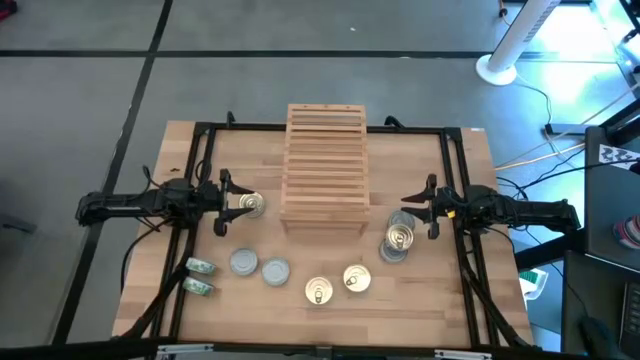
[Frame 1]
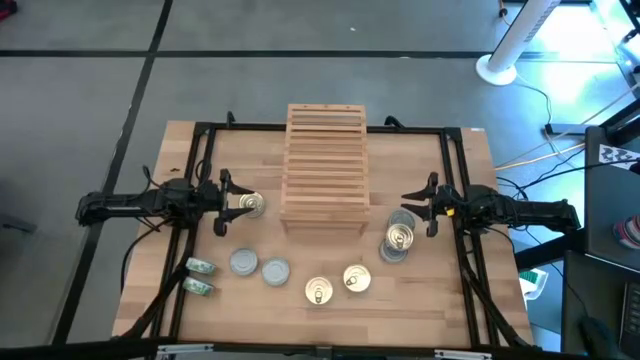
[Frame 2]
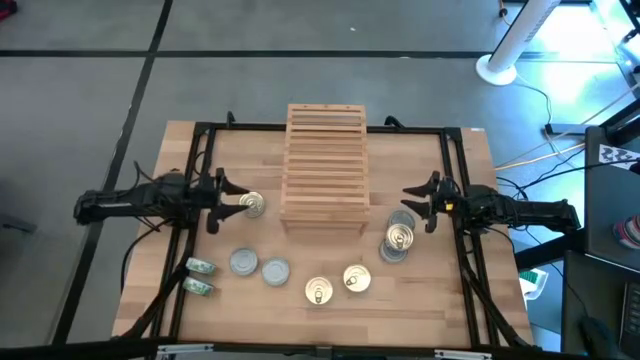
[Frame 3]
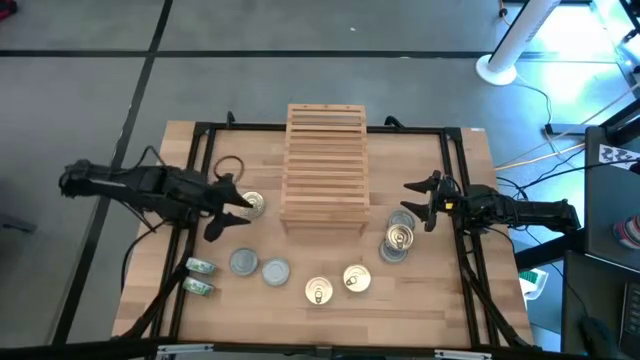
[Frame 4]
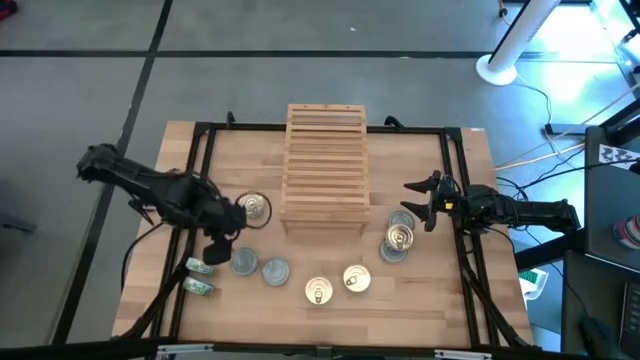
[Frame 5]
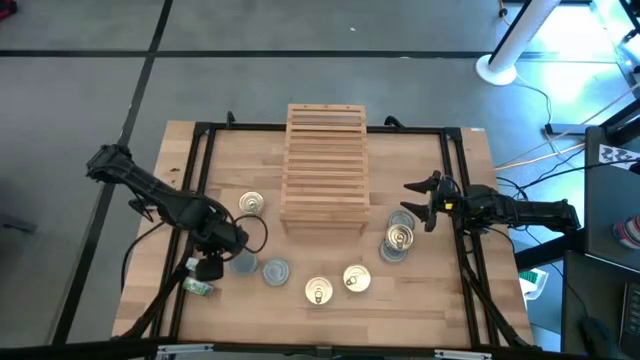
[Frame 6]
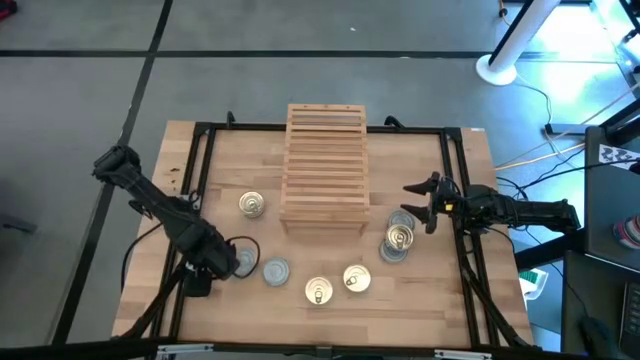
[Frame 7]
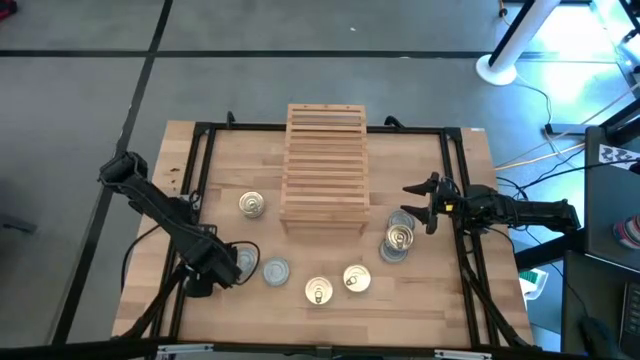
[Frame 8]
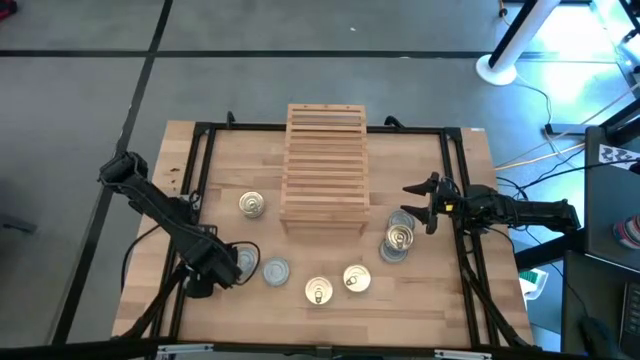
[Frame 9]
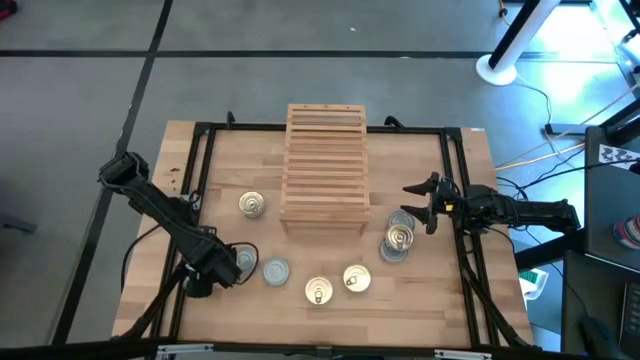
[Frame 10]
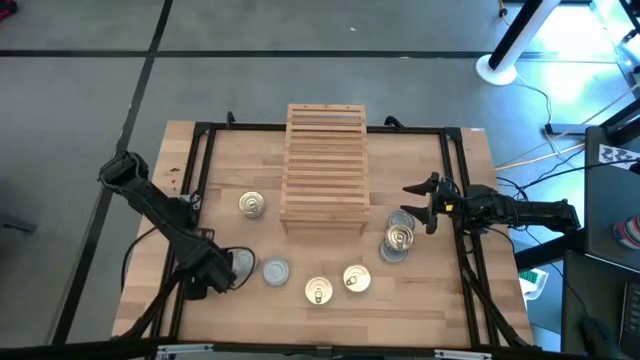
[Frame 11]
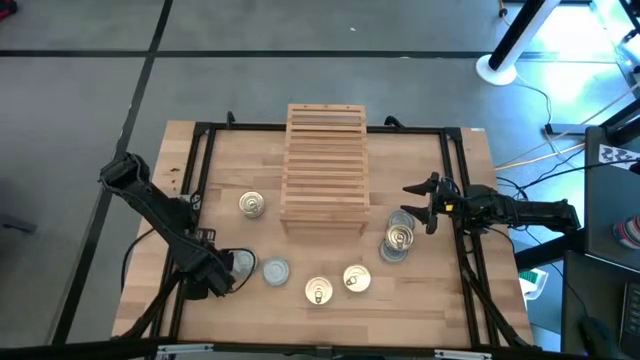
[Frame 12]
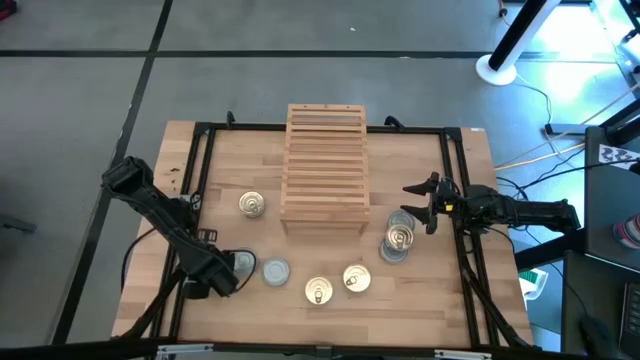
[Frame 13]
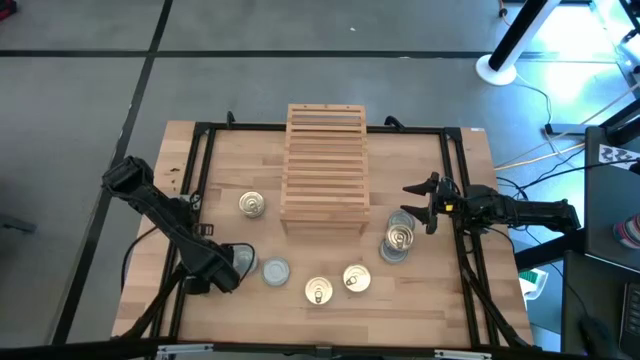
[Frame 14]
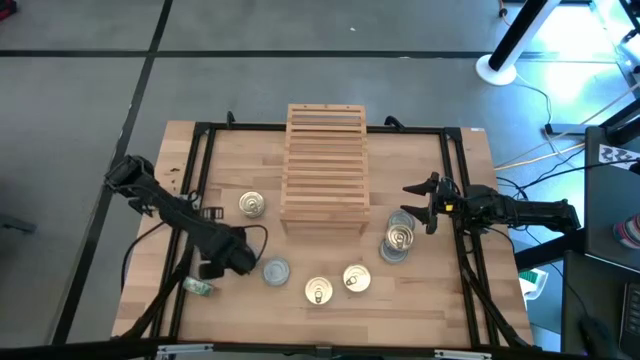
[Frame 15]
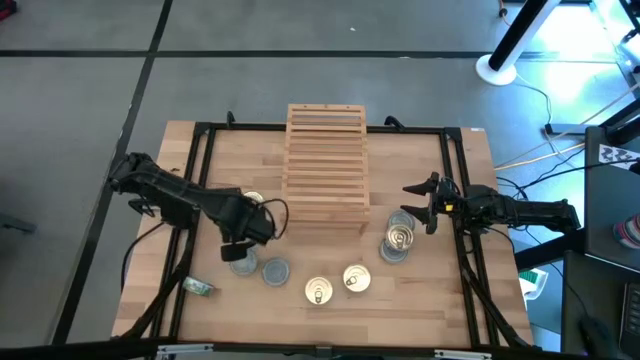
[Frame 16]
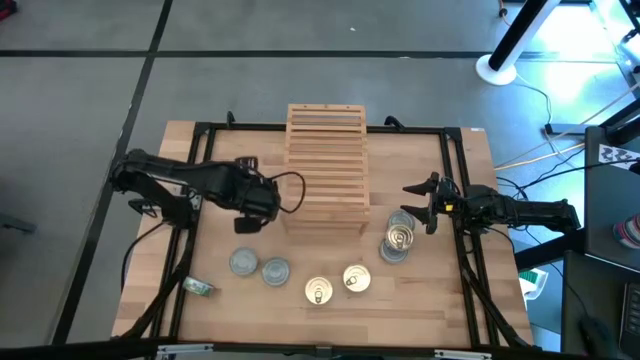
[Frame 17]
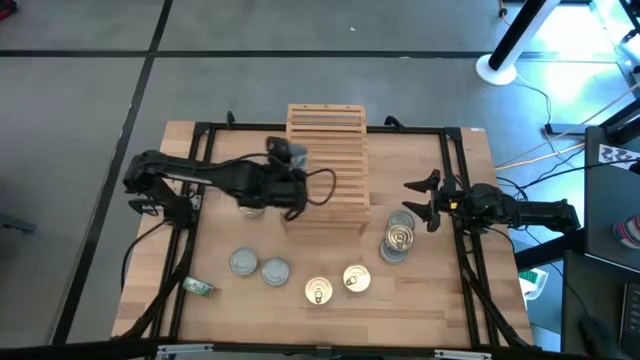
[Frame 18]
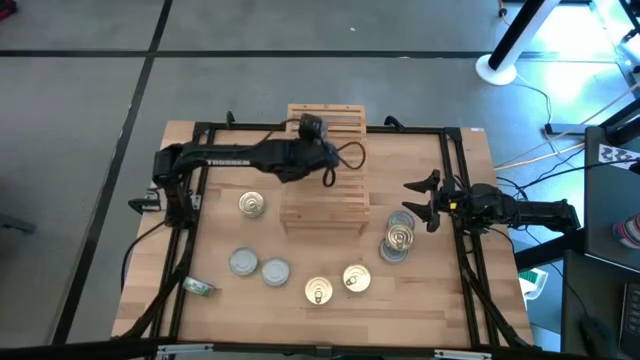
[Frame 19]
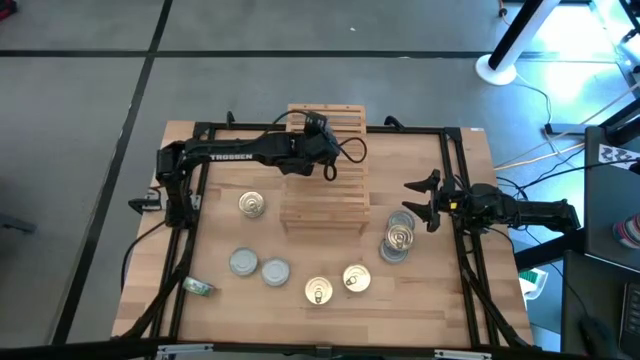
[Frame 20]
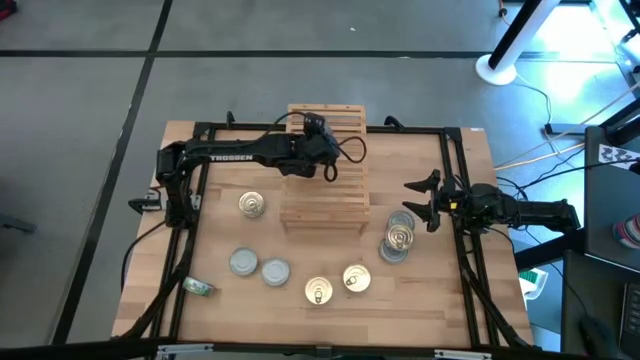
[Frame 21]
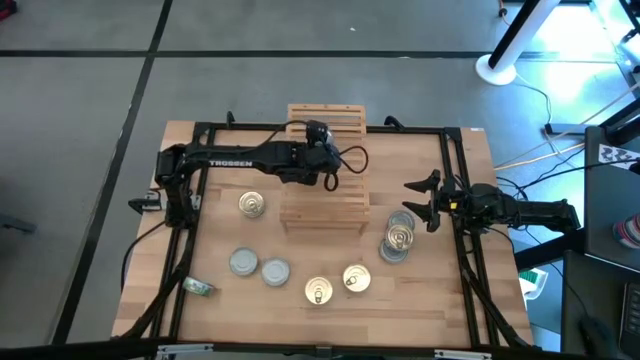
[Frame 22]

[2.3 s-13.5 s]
Task: Stack canned seafood by type on shelf
Put the green tuna can on the shelf

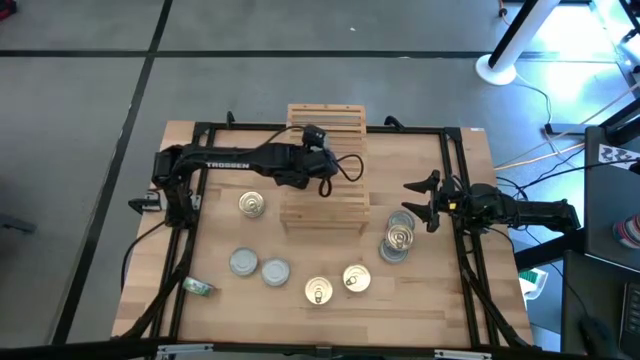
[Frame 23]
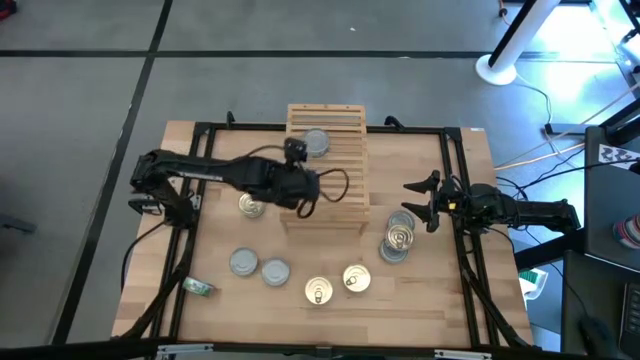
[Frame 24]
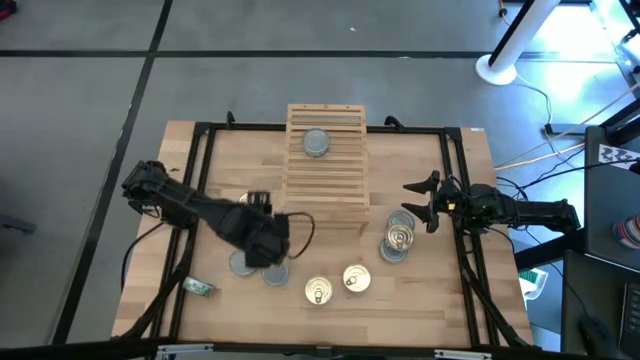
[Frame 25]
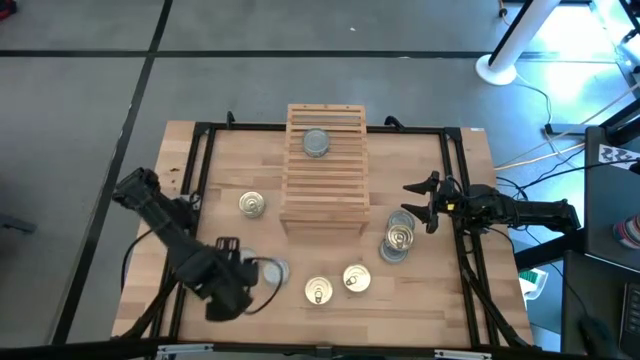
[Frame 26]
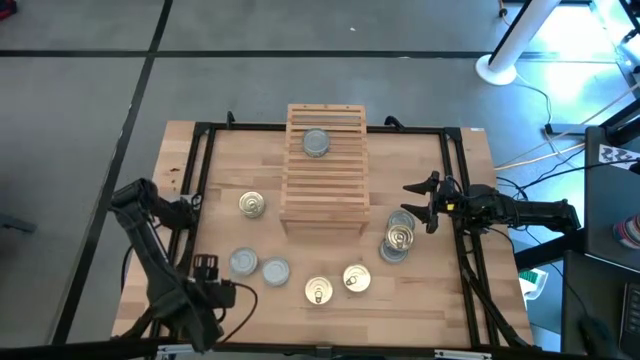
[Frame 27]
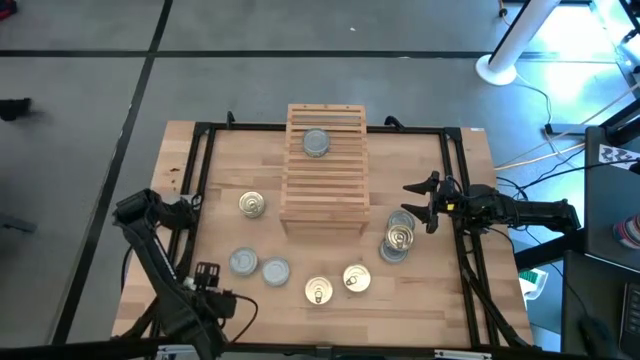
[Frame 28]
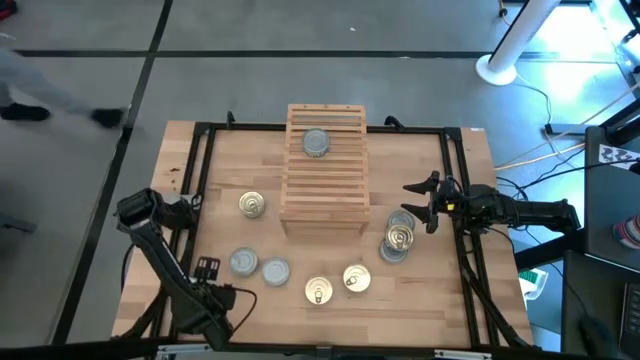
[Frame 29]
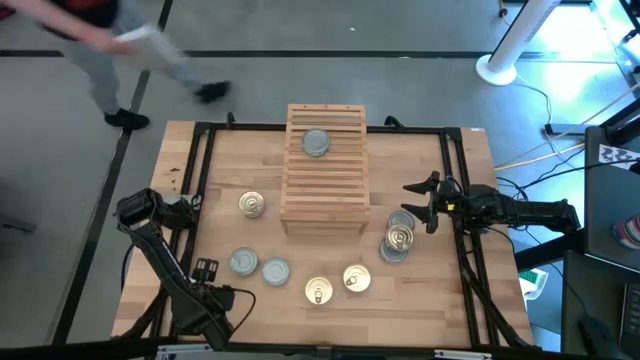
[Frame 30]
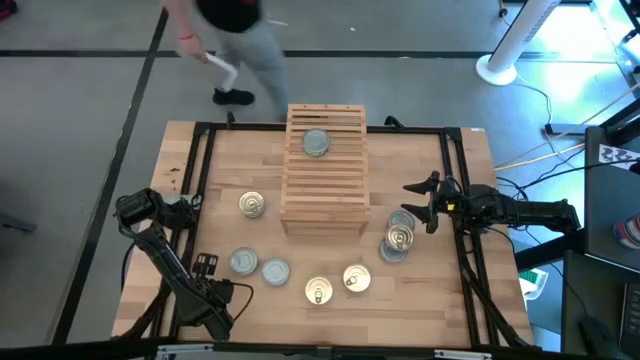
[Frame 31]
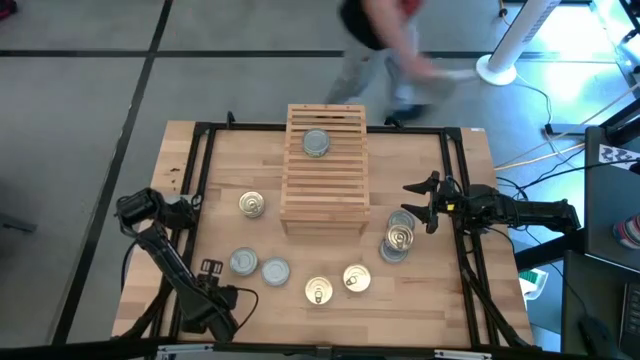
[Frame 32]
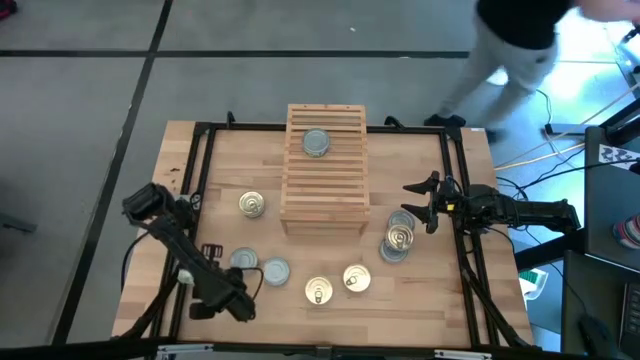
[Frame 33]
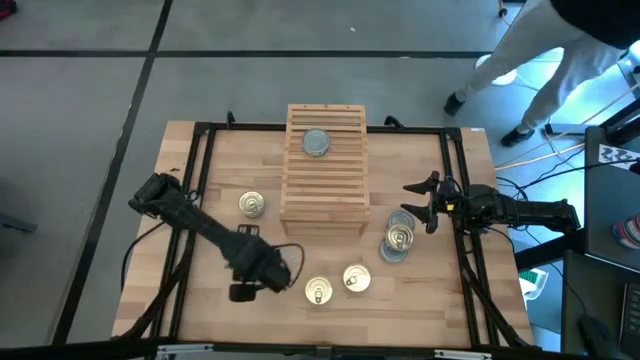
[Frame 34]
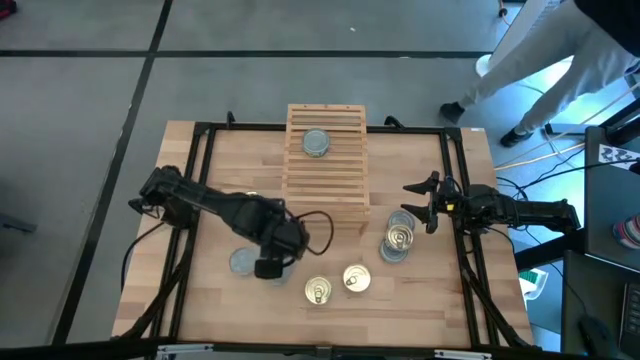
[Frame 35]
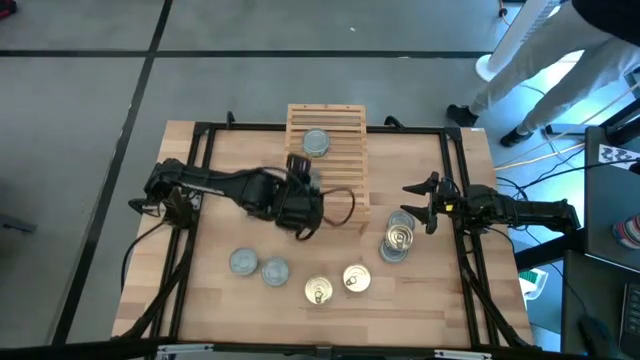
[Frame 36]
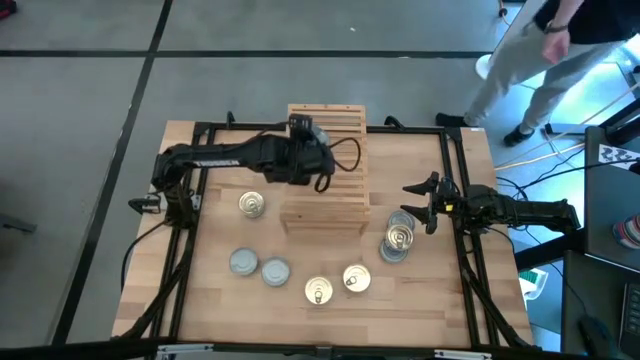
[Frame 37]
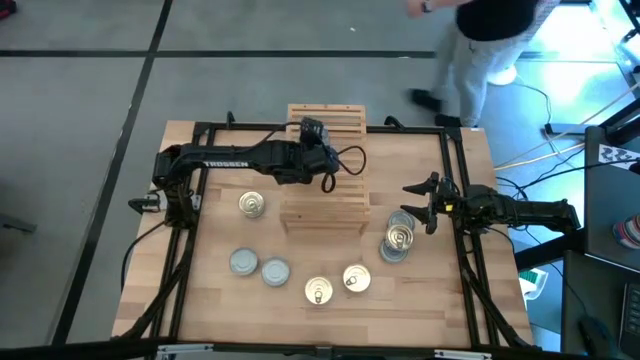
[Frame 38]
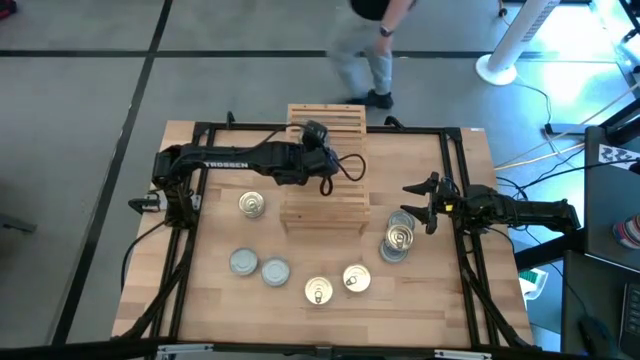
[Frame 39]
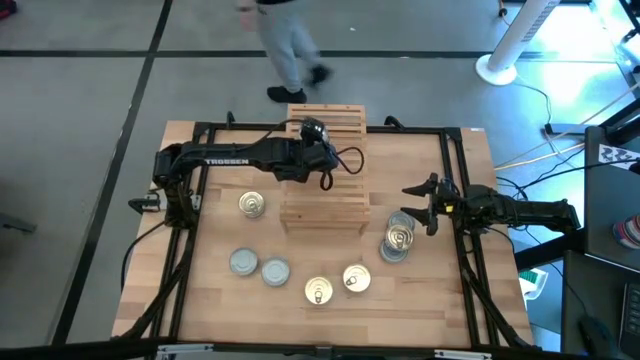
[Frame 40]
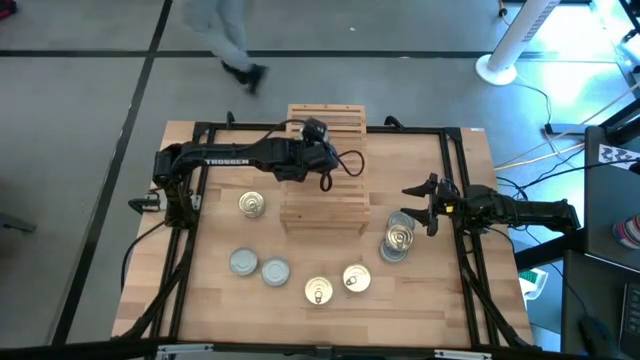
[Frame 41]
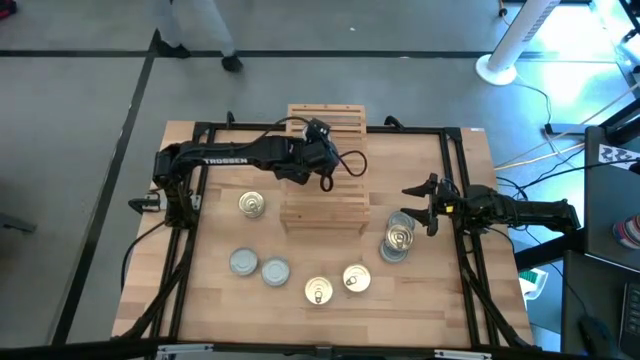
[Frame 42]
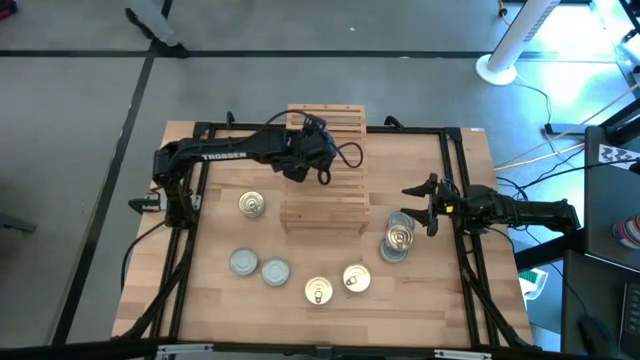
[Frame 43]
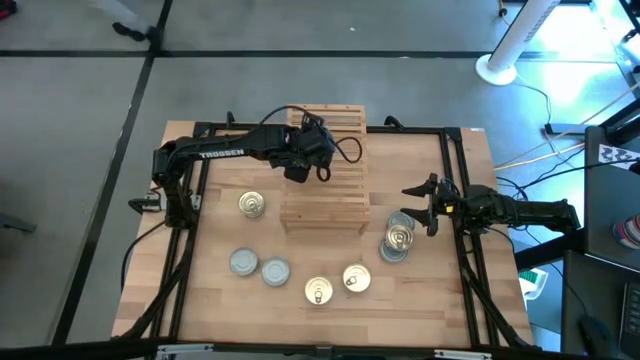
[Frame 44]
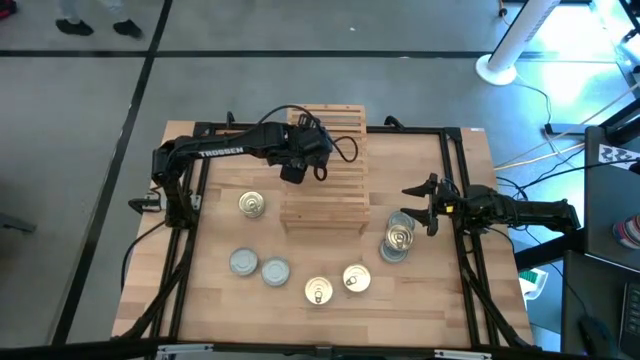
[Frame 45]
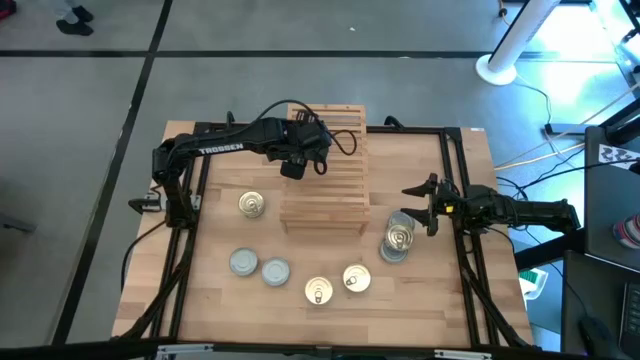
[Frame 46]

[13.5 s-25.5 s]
Stack the green tuna can on top of the green tuna can on the shelf
